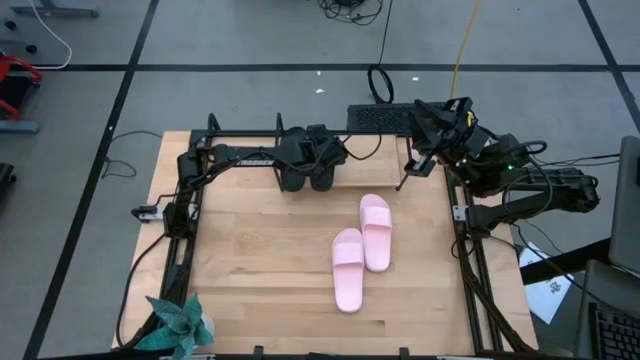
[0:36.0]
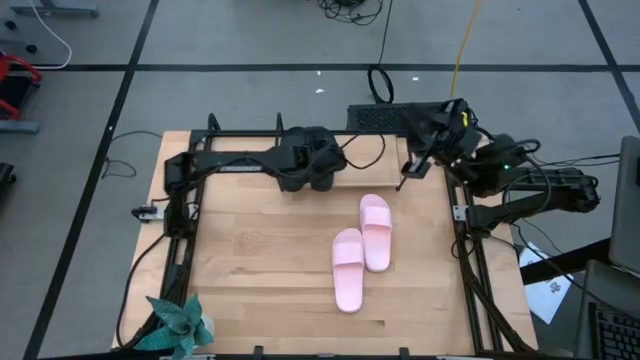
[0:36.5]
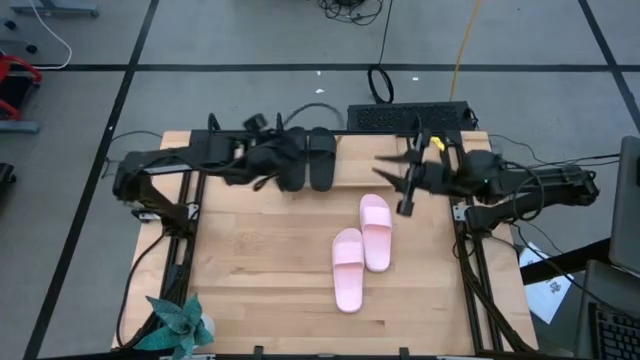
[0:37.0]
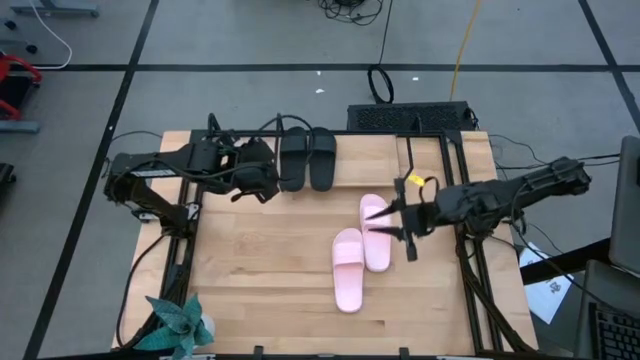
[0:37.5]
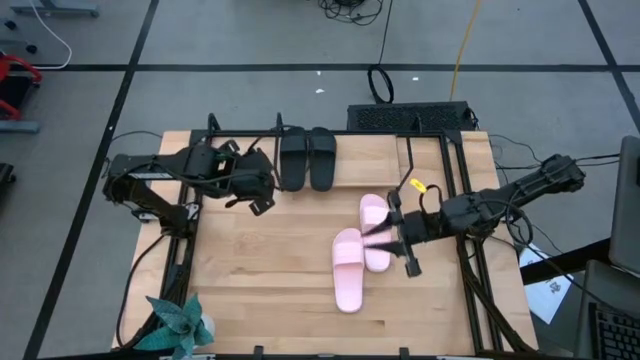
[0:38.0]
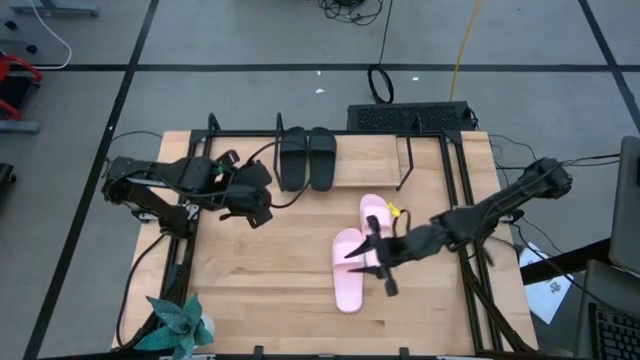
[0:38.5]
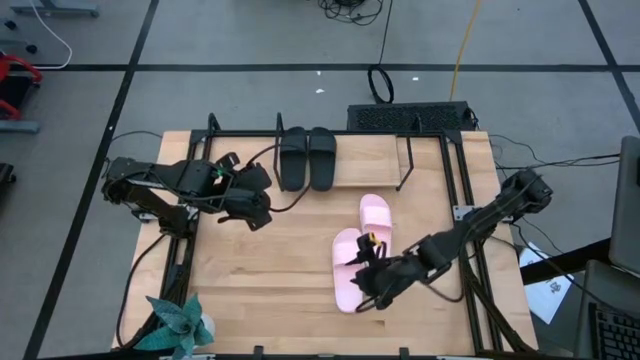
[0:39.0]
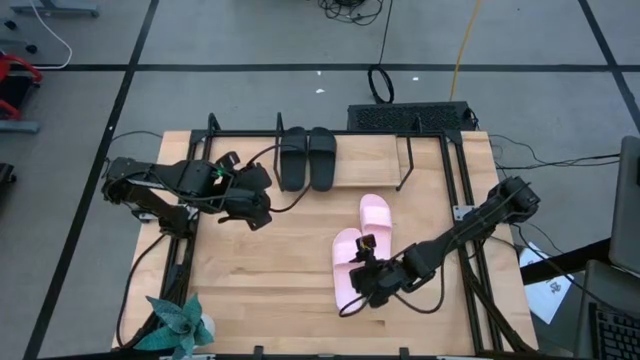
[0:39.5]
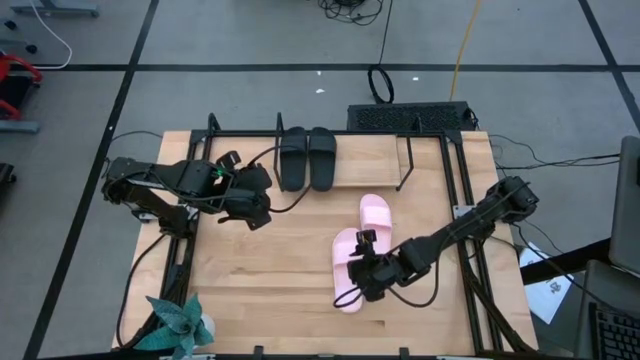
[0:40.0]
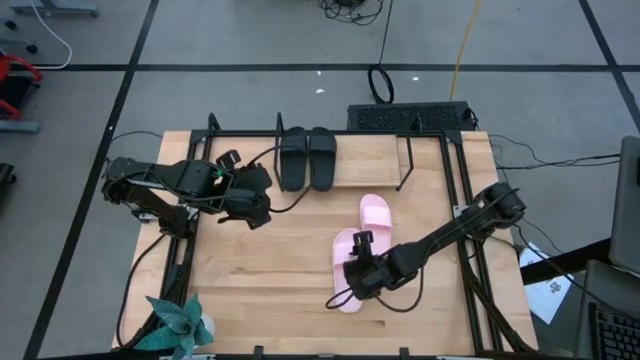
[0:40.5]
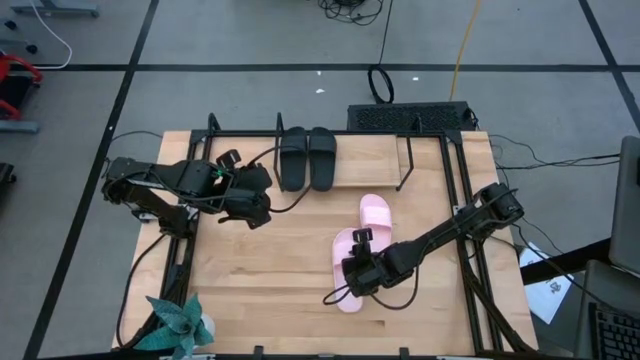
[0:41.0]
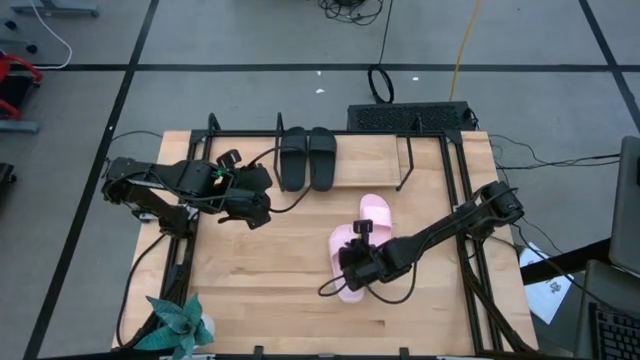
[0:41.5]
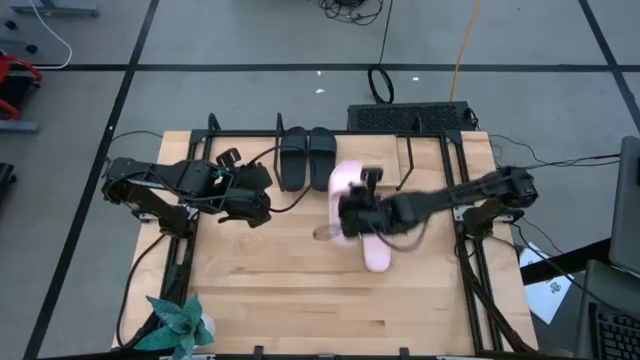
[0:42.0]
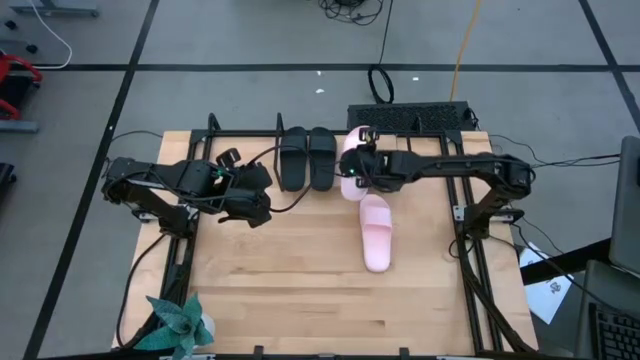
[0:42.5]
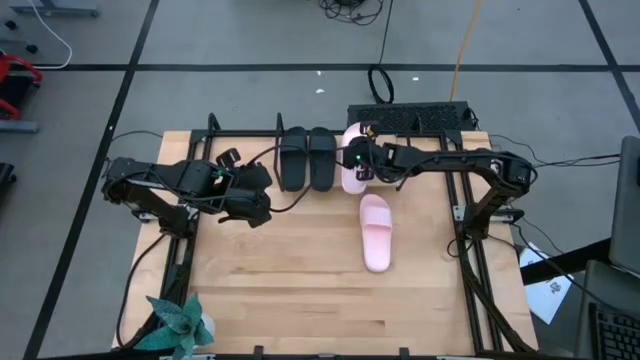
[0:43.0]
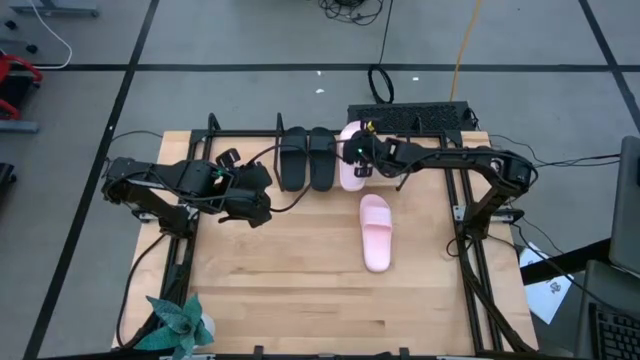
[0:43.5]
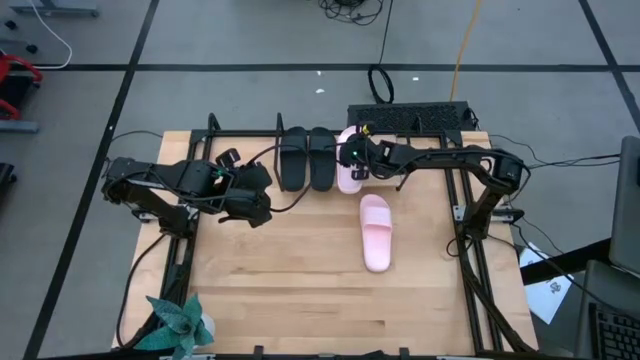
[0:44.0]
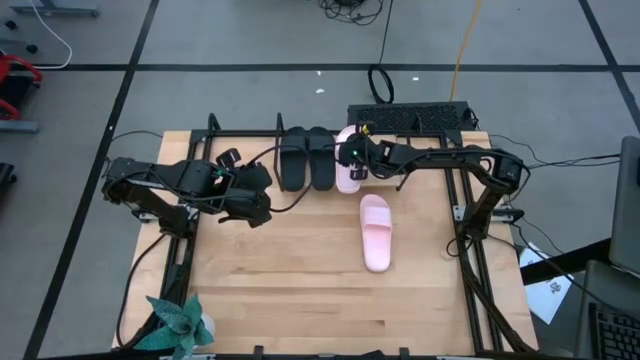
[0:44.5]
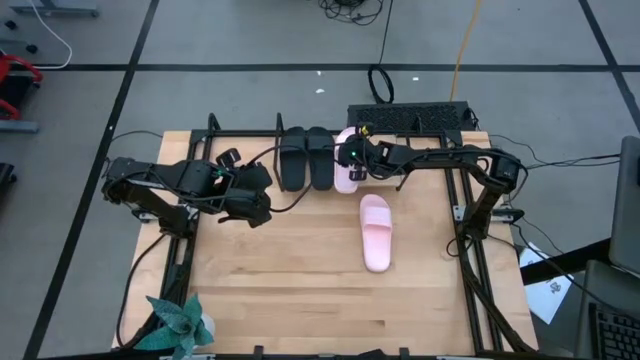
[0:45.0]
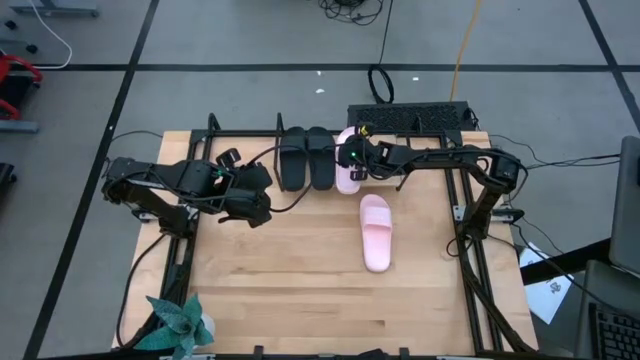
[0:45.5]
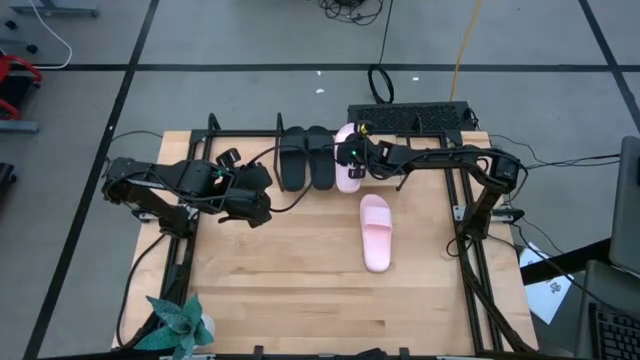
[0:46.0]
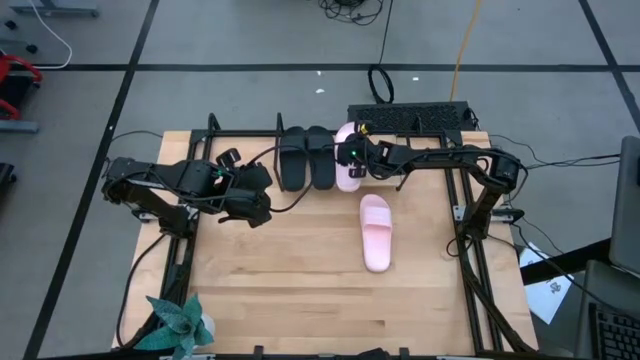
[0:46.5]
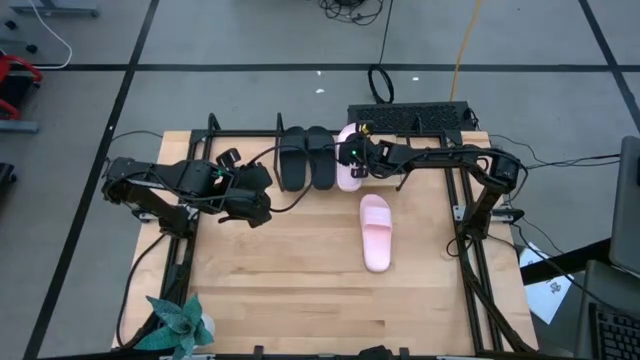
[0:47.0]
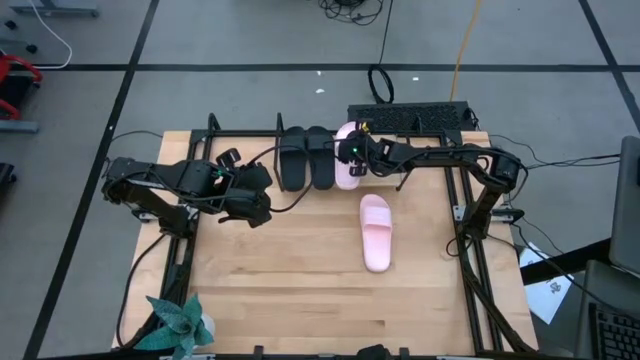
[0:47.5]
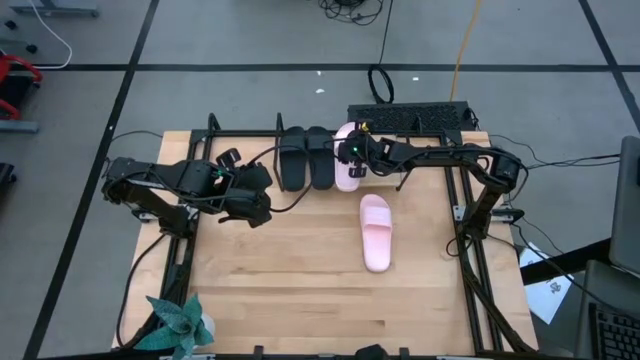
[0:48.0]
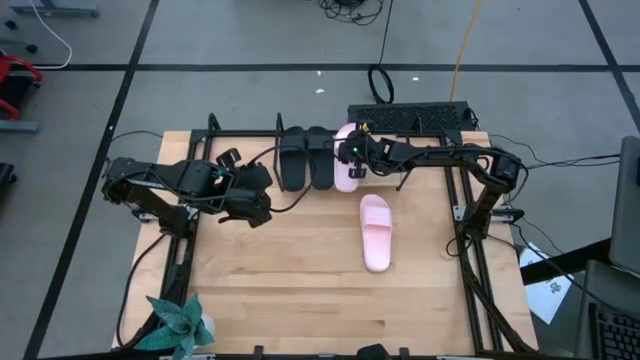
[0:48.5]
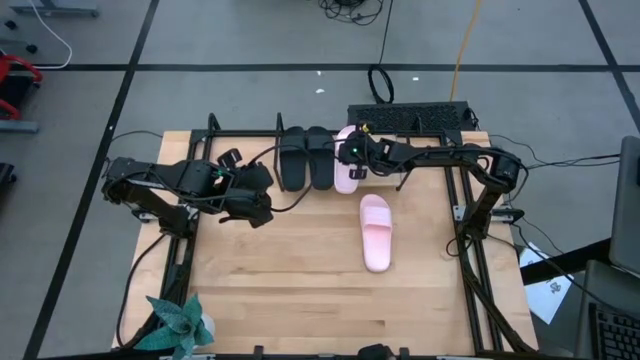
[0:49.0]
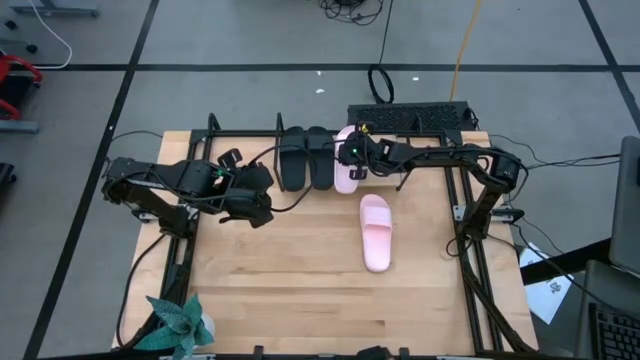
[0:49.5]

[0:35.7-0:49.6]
Task: Pick and place slides into the shelf
Put the bottom pink slide on the shelf

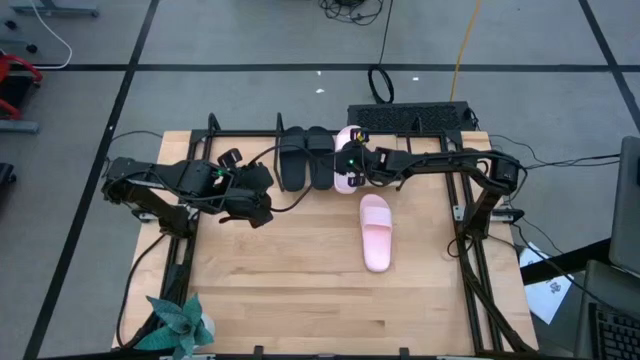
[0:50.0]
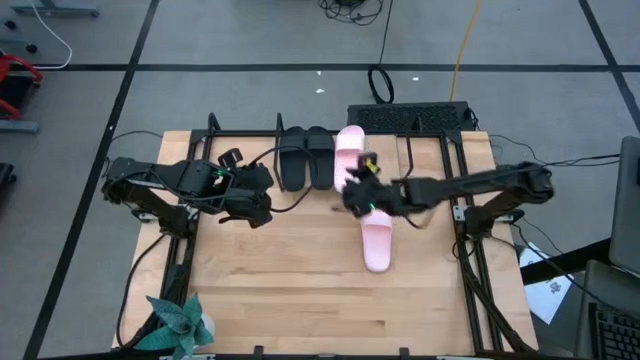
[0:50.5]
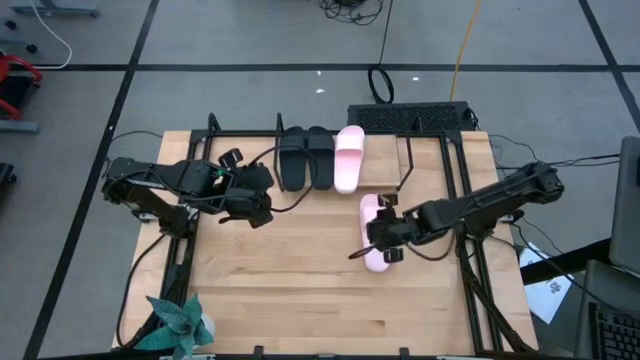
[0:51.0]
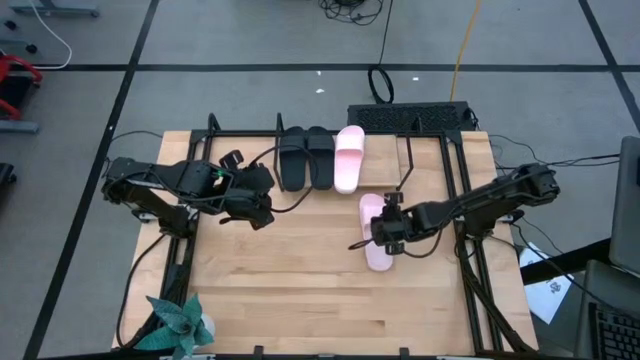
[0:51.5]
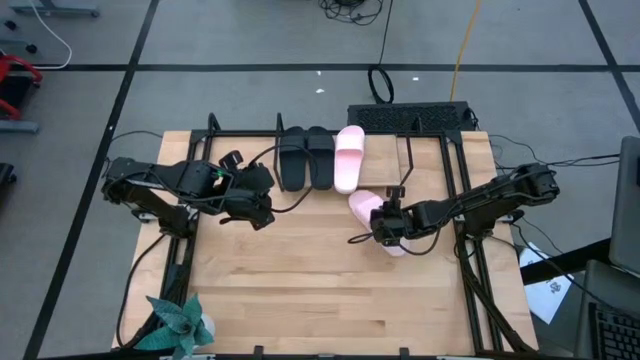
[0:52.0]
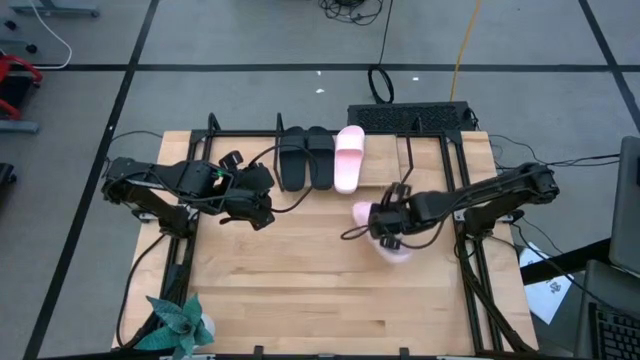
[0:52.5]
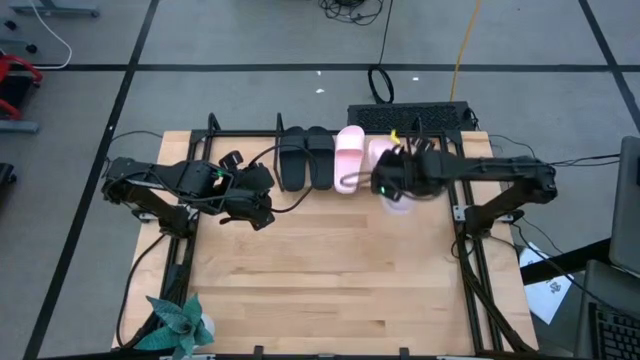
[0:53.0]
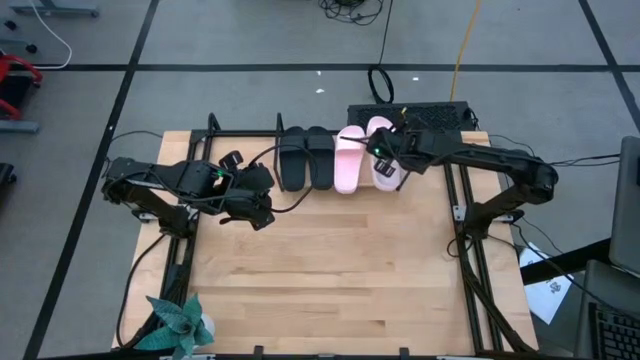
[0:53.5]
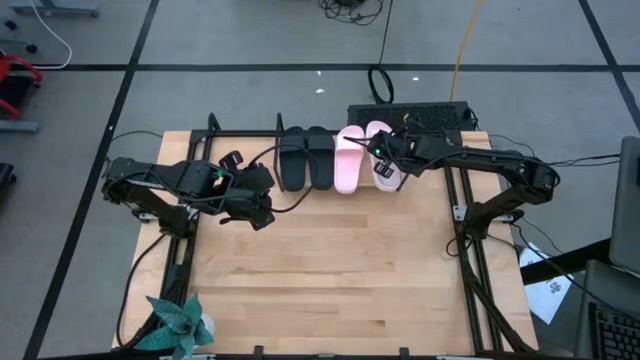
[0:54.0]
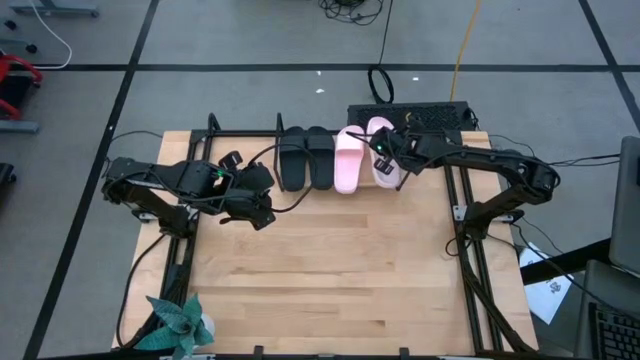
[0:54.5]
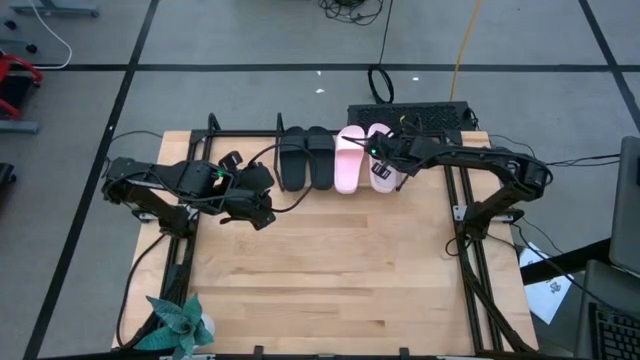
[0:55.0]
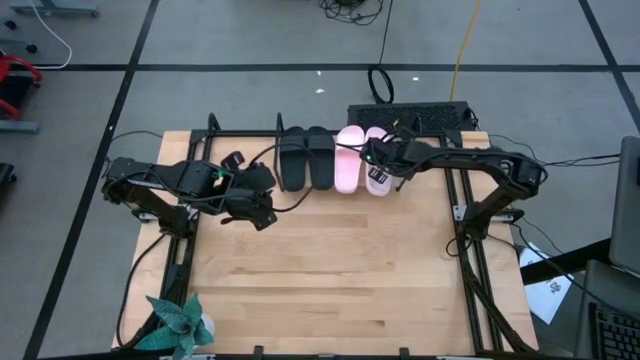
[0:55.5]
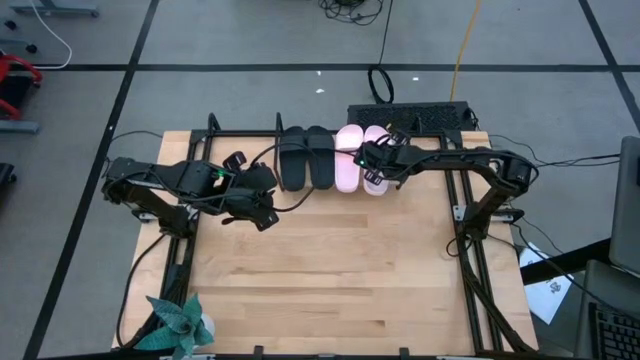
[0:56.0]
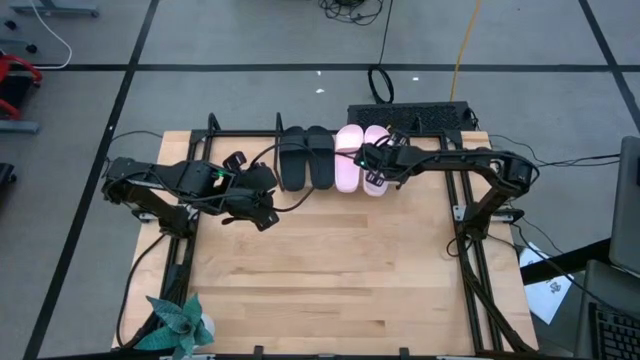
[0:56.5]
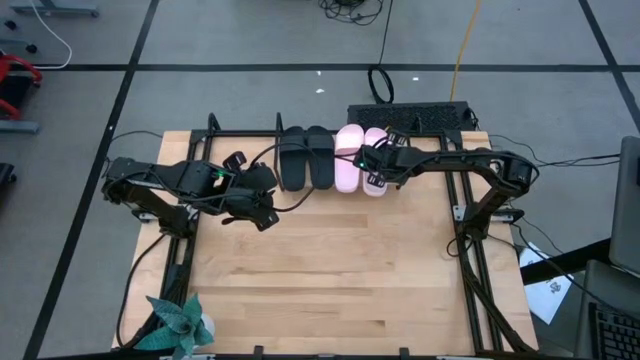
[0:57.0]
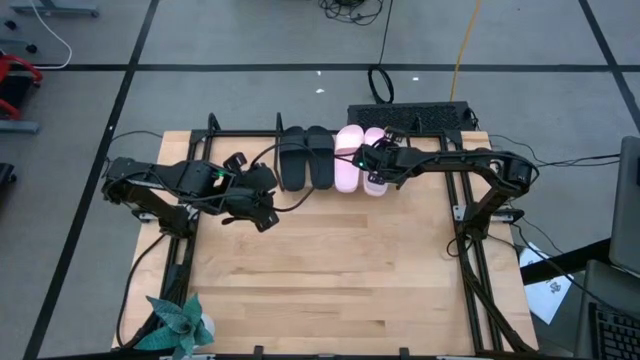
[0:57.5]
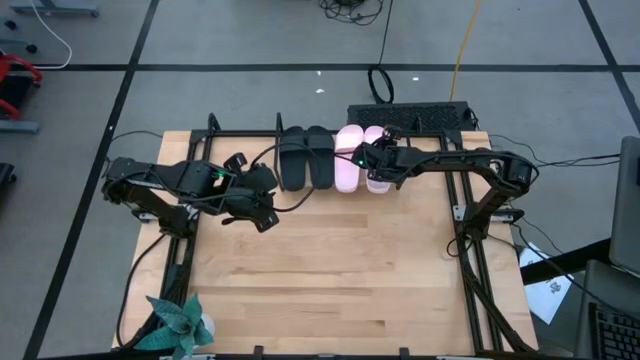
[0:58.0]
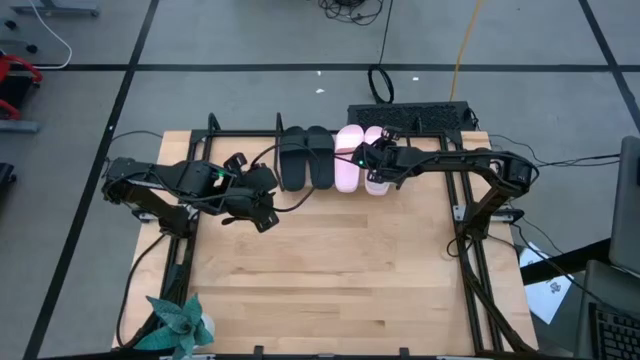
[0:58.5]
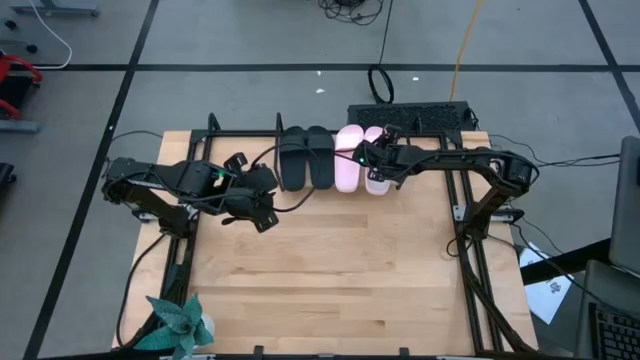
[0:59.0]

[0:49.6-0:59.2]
Put the pink slide on the shelf
